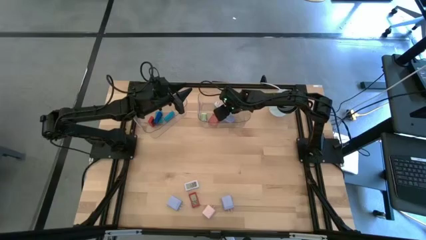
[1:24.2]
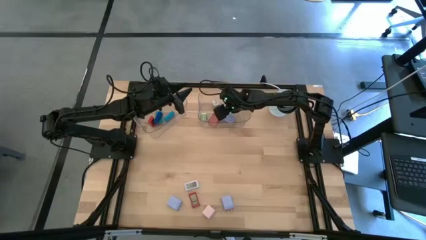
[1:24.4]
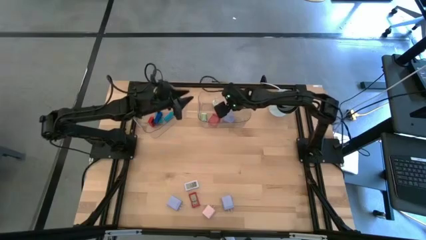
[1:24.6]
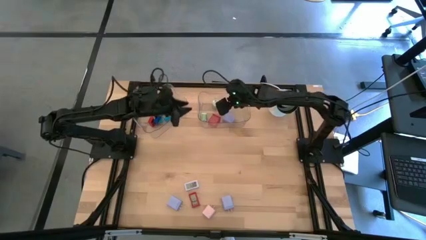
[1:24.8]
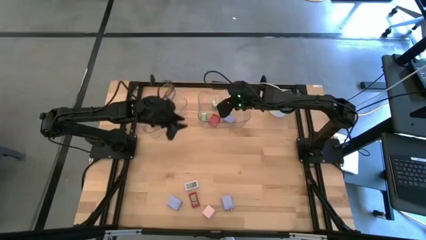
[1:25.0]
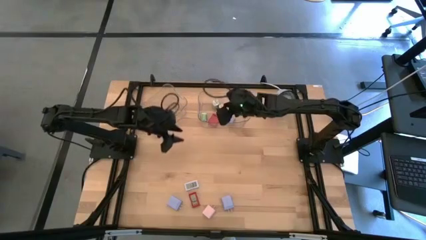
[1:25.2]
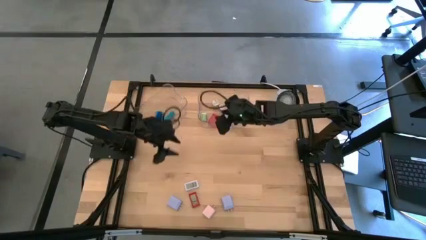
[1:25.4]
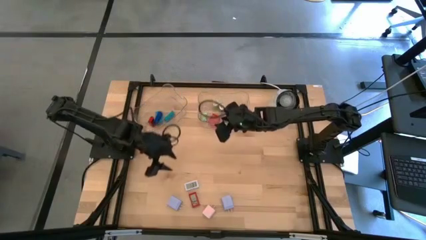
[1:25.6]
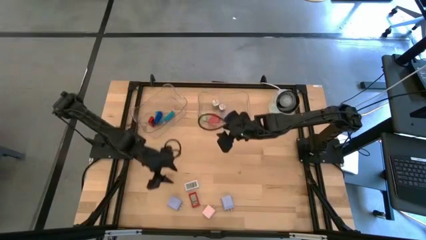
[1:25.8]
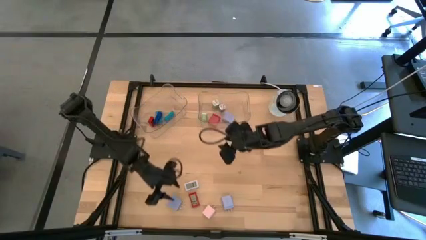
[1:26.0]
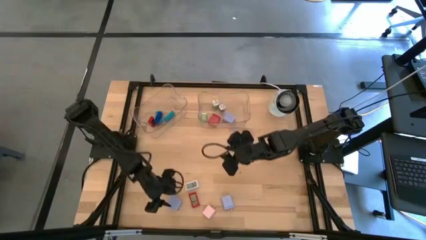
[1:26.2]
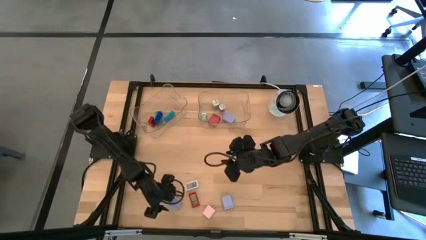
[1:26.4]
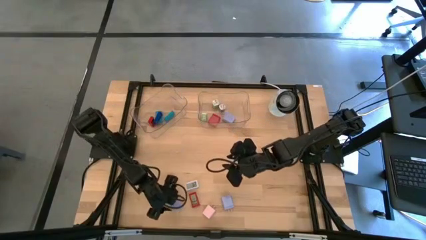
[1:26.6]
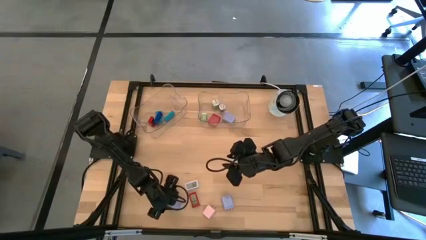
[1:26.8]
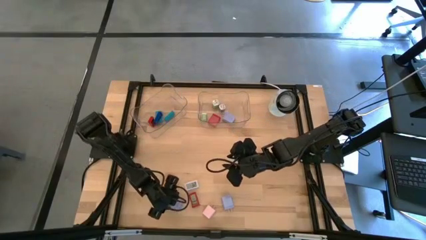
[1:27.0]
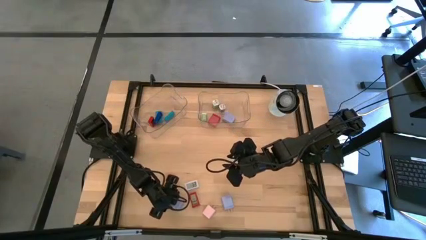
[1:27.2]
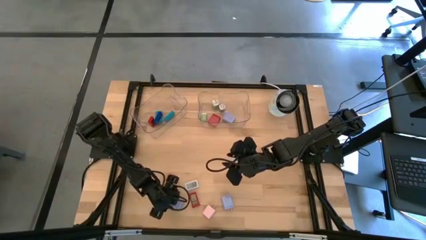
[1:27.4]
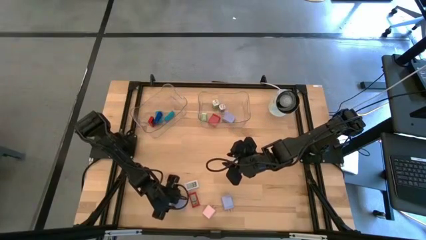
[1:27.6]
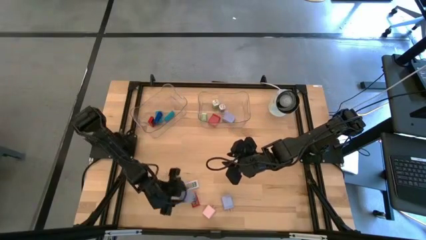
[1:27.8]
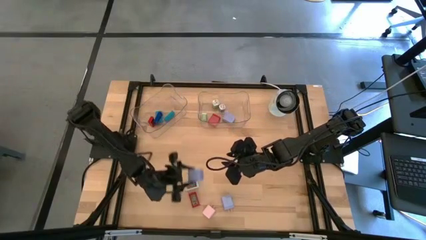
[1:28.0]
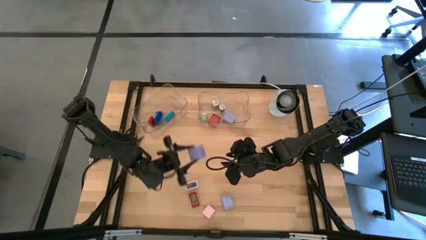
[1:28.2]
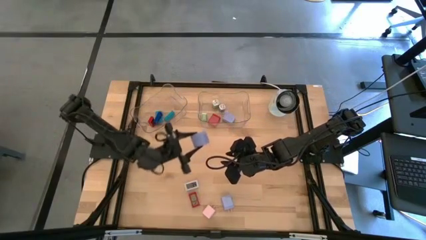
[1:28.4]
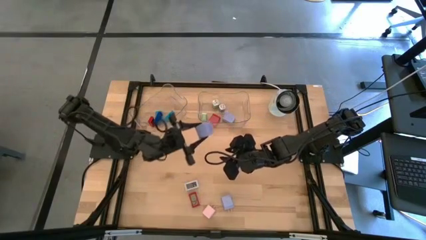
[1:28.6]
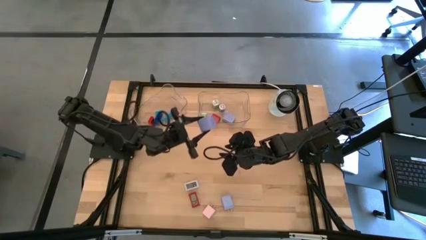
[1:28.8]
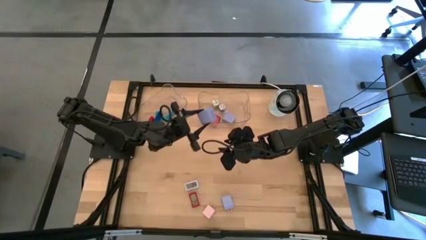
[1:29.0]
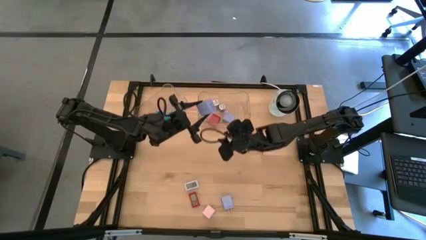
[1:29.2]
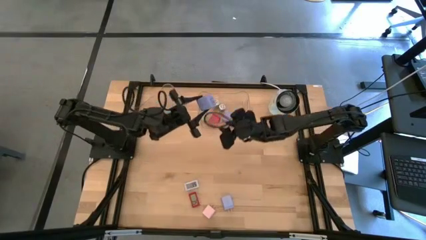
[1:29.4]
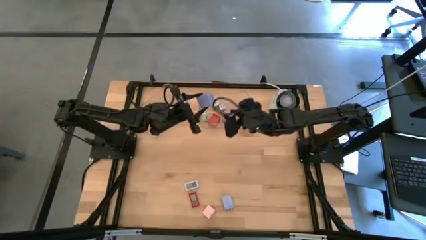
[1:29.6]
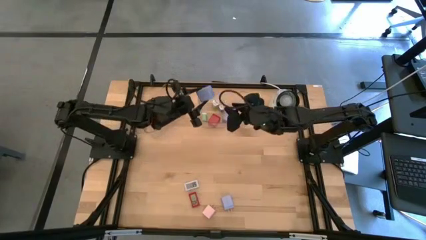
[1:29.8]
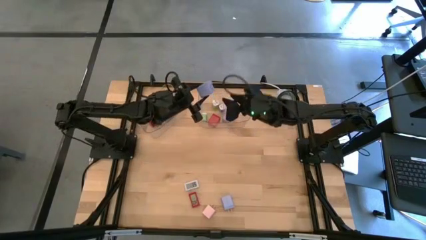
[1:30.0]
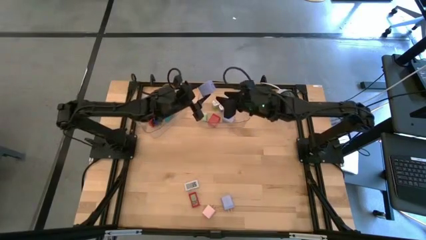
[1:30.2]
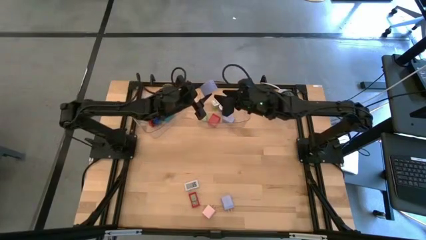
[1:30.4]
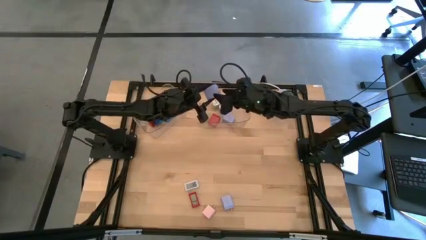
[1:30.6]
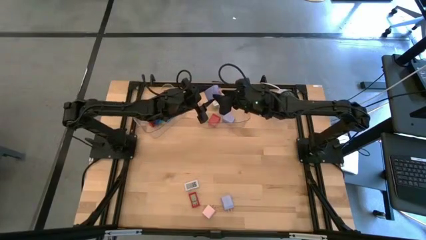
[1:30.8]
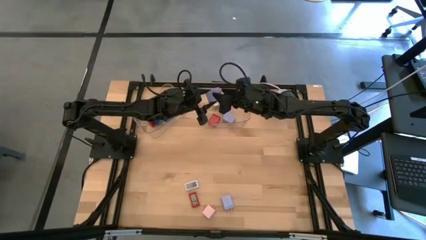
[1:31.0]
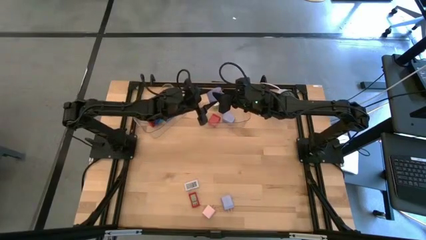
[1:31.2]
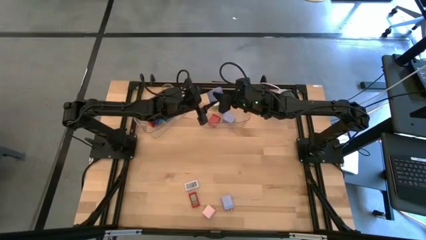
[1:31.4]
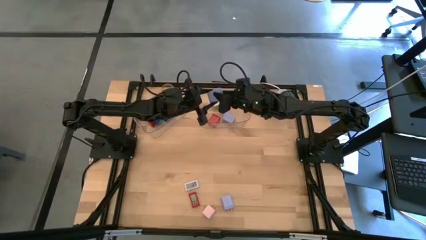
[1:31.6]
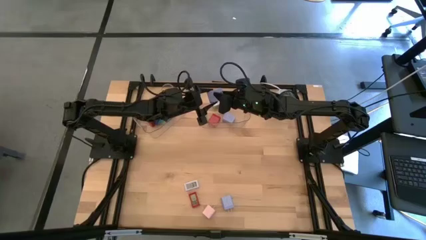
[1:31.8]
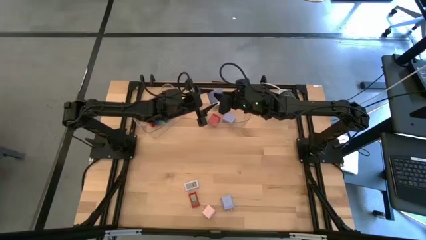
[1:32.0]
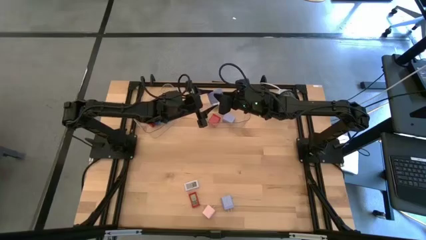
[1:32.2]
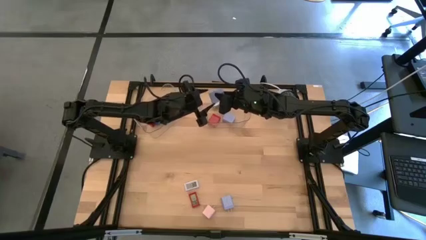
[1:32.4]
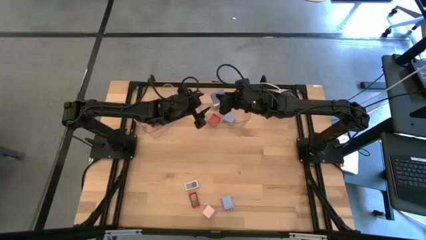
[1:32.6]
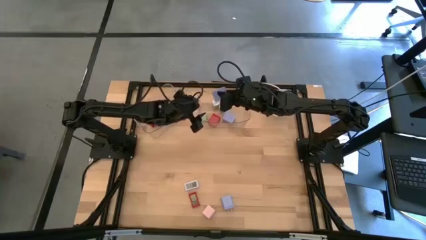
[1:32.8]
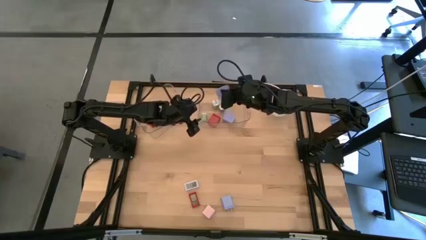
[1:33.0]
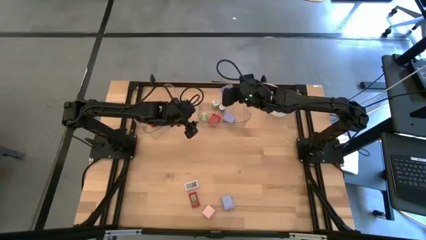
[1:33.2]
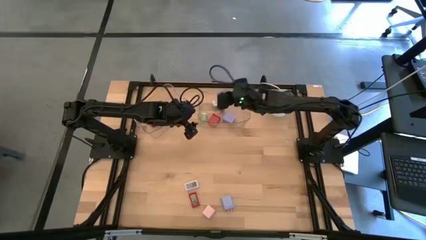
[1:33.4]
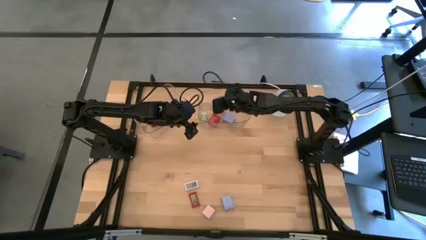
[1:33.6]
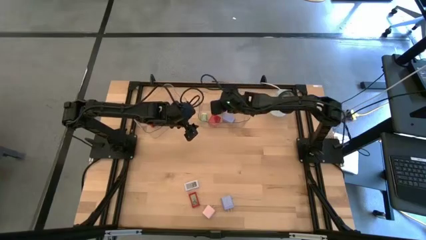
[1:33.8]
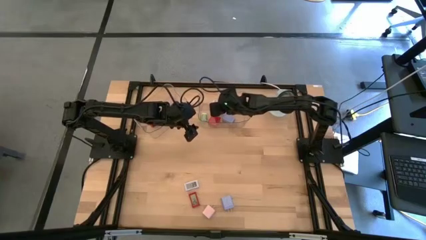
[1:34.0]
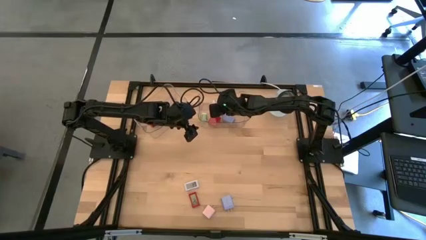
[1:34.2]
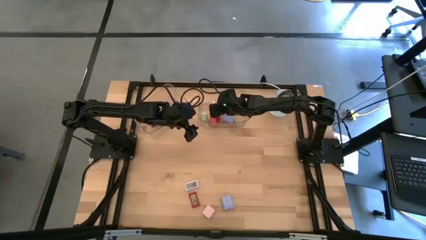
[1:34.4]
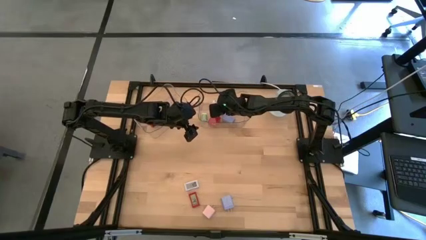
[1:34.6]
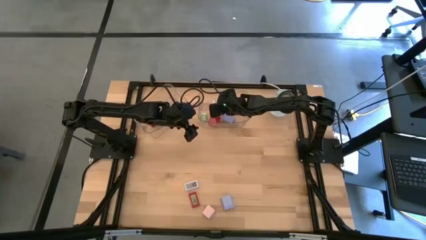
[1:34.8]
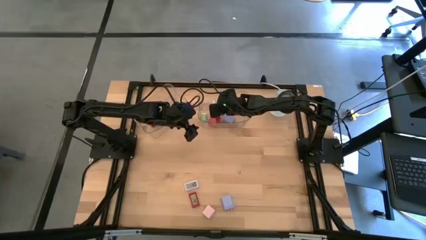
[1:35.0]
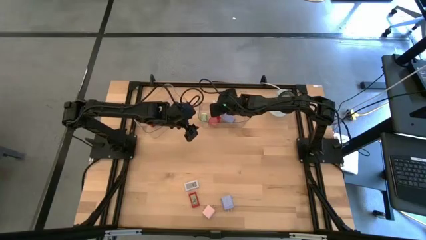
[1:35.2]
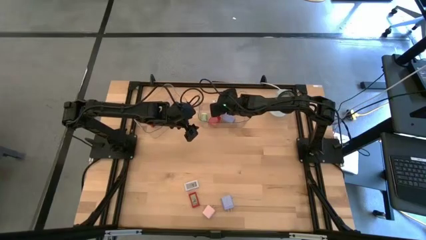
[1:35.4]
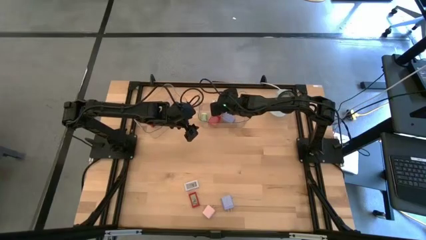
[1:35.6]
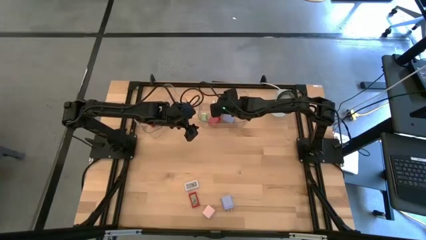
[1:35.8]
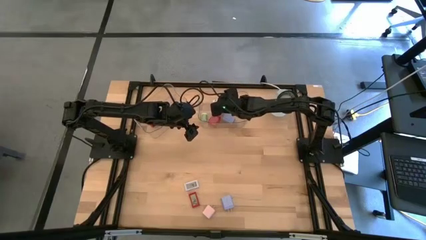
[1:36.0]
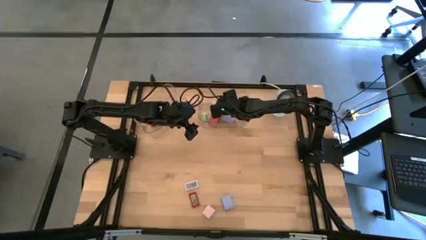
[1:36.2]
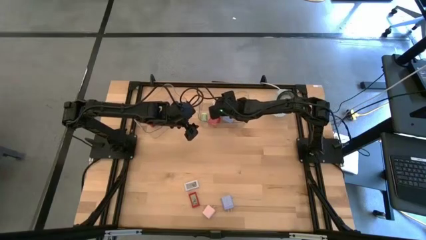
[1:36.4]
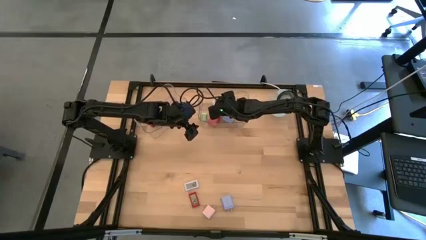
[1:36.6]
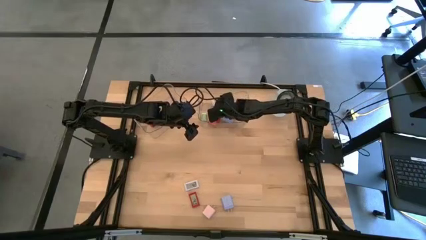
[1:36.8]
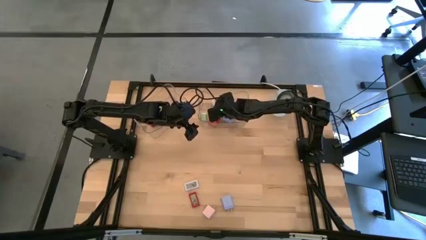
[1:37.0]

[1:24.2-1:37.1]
Task: Pick & Place Office items
Put the left blue charger adapter into the right transparent bin

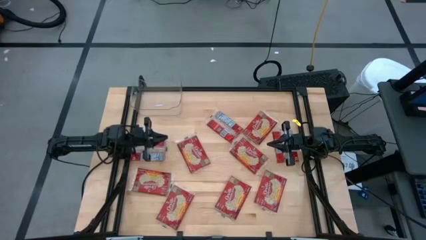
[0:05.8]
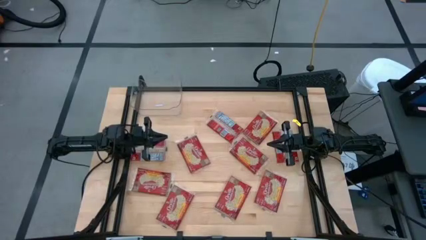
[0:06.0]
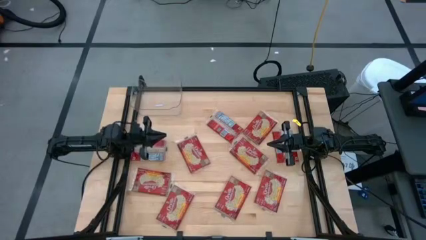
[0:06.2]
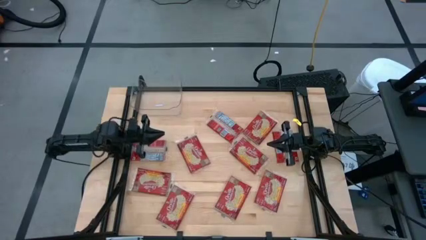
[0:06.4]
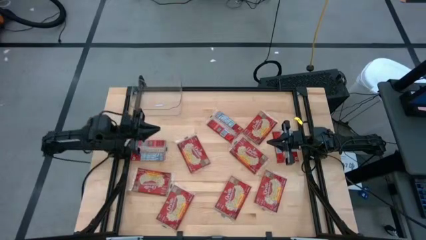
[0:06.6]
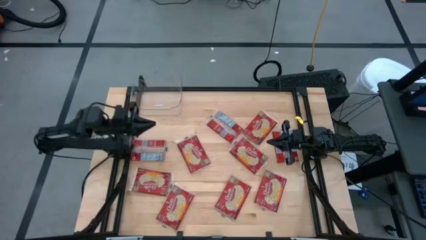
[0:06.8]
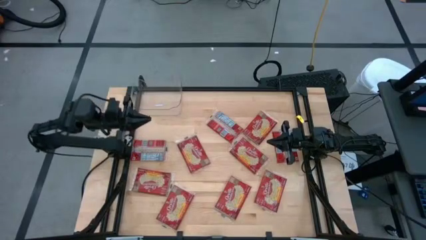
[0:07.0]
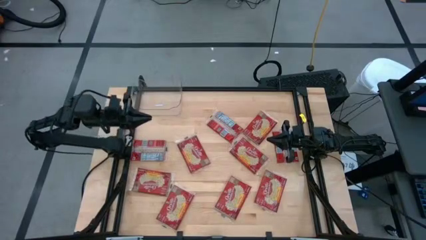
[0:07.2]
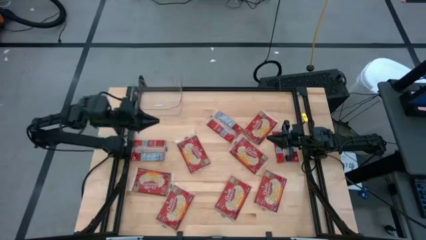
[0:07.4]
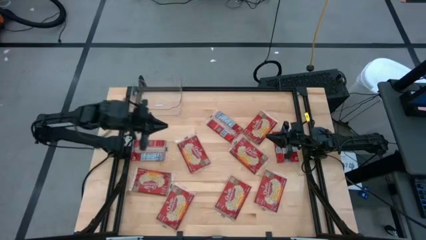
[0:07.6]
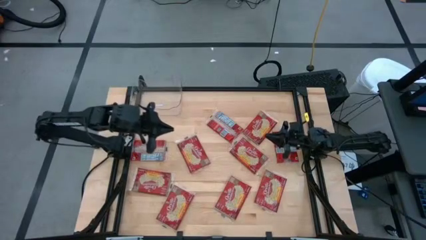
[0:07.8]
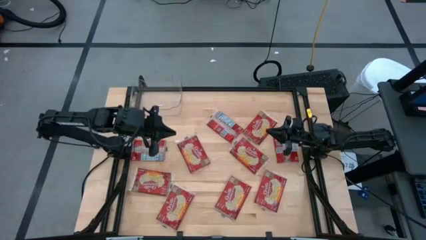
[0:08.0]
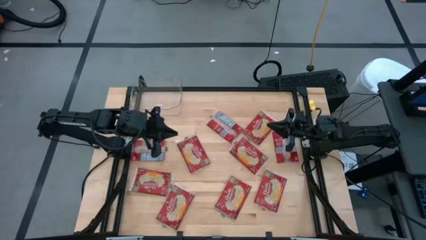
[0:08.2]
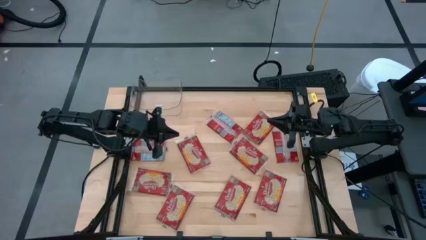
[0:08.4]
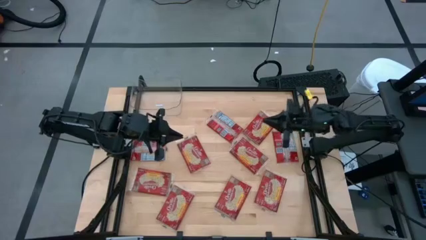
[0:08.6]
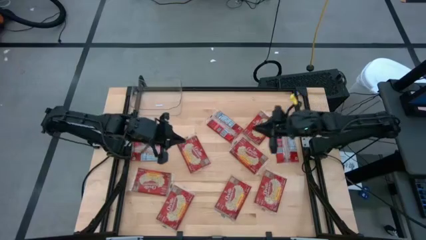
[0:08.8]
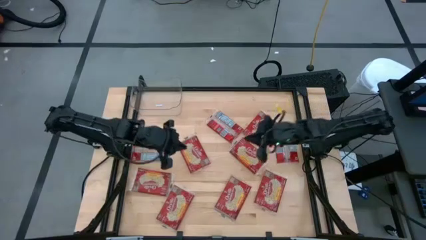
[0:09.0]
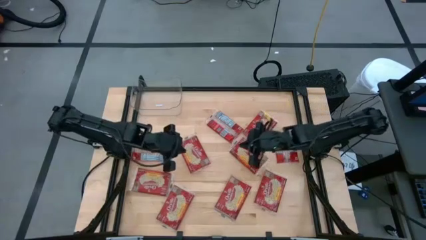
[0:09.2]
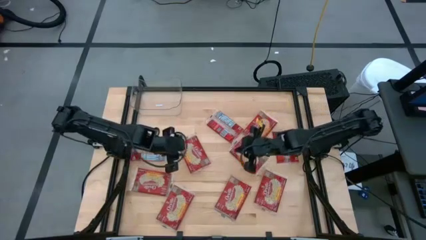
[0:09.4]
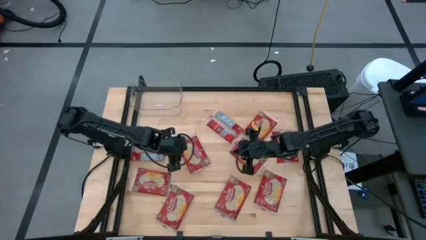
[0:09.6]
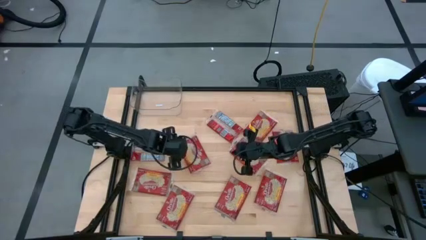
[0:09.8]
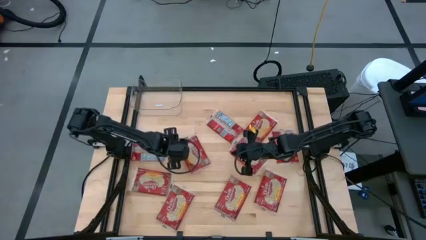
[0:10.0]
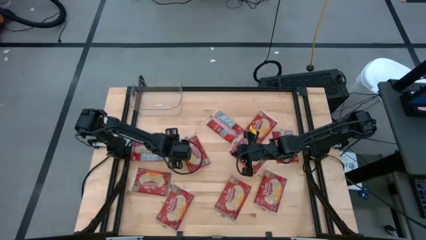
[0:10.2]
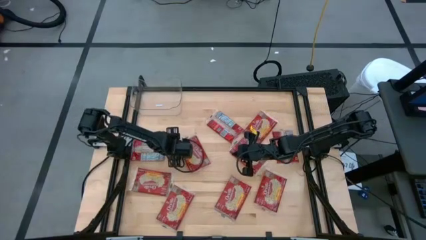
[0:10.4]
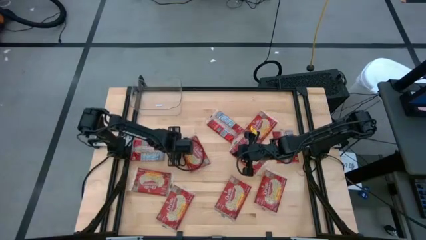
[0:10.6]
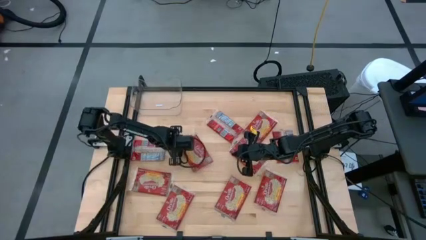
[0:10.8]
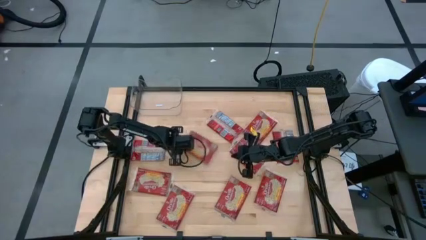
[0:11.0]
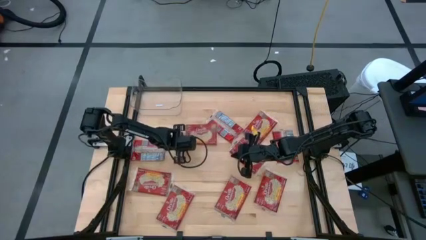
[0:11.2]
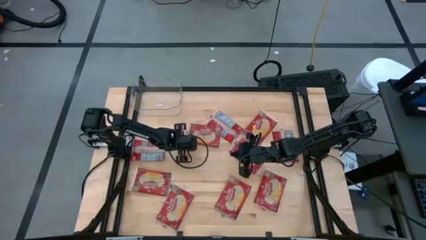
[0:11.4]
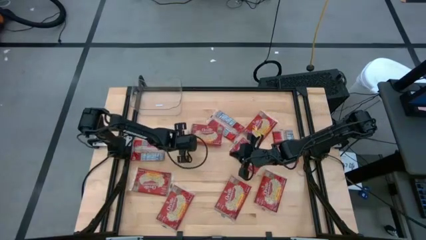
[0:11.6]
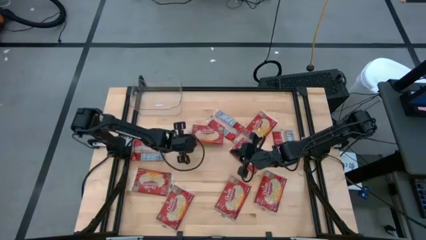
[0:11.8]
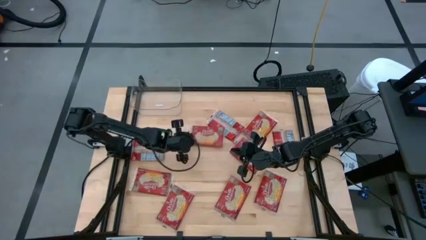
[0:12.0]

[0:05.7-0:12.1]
Task: Sort popcorn bags into baskets
Put the red popcorn bag into the transparent bin
